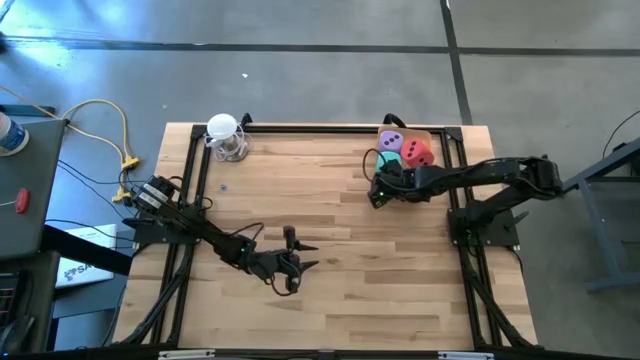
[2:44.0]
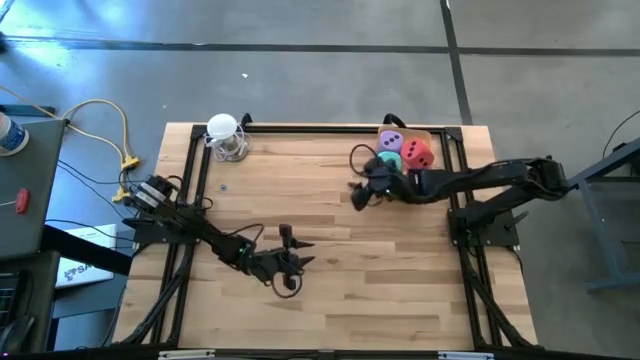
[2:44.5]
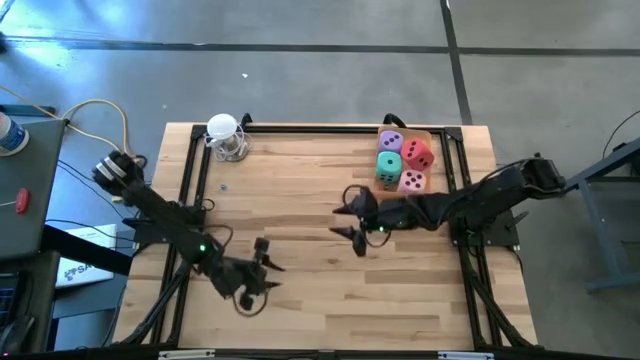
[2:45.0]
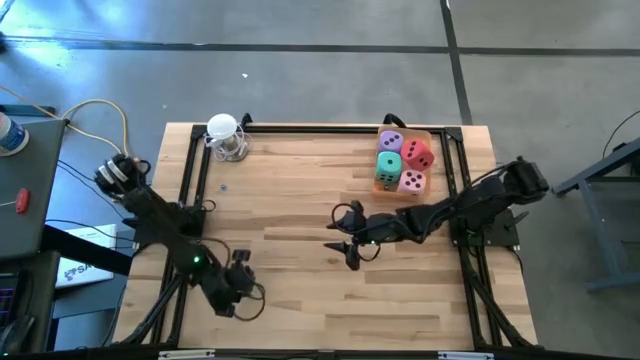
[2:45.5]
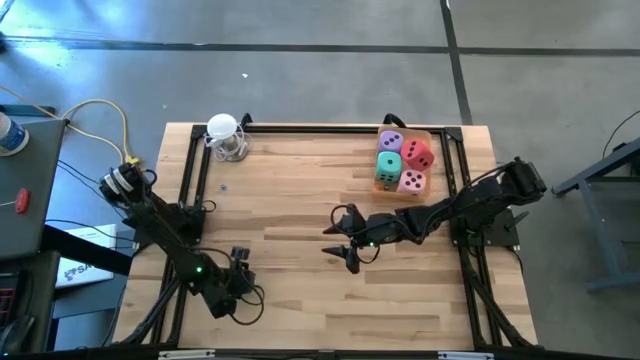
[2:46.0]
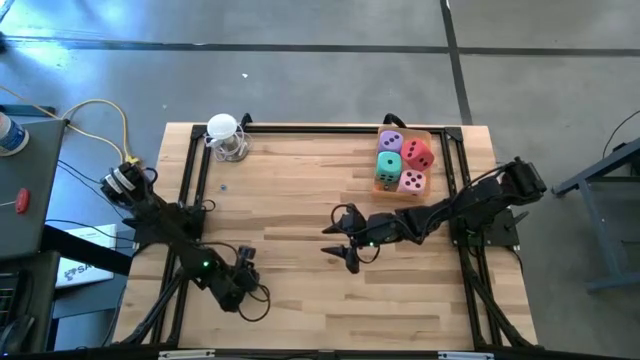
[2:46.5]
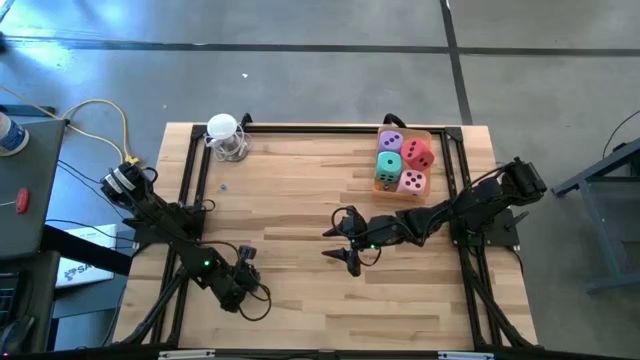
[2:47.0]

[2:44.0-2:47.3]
Task: Pick & Place Dice
Put the green small die into the orange bin

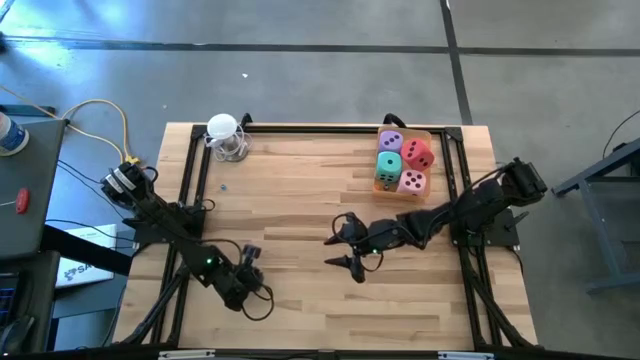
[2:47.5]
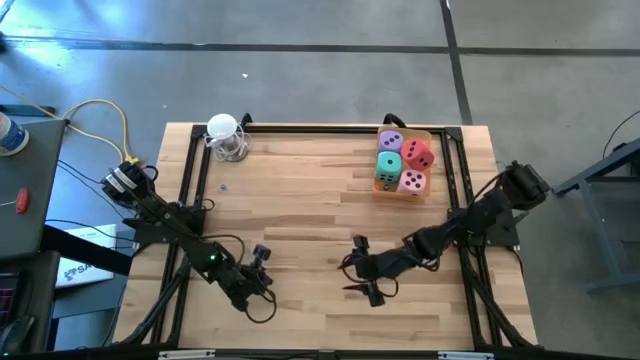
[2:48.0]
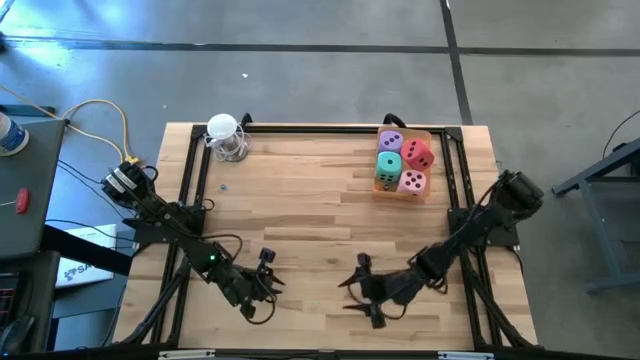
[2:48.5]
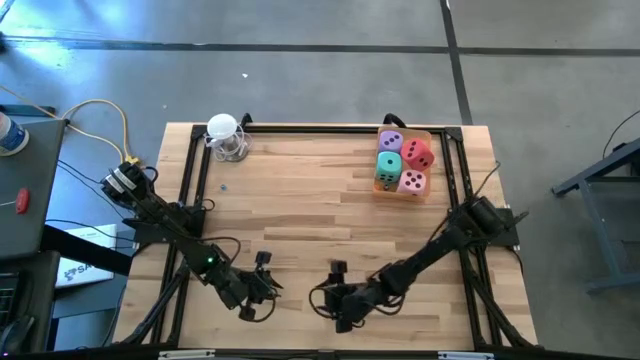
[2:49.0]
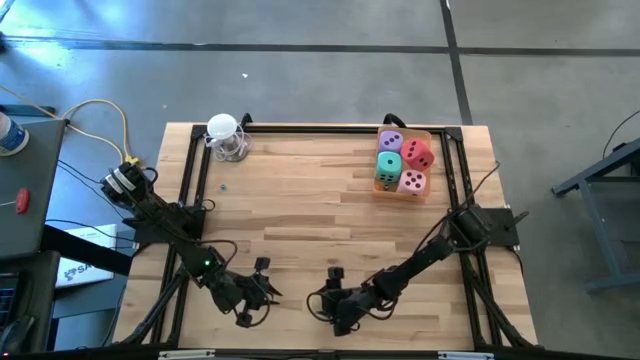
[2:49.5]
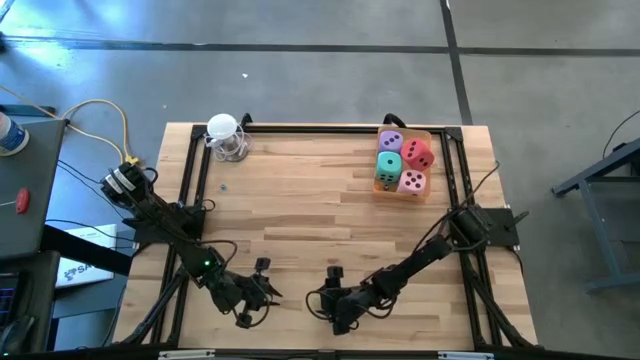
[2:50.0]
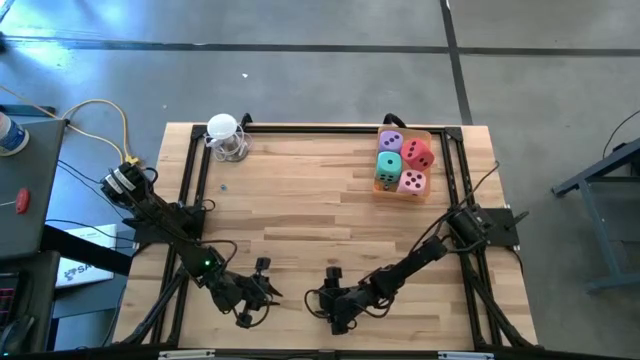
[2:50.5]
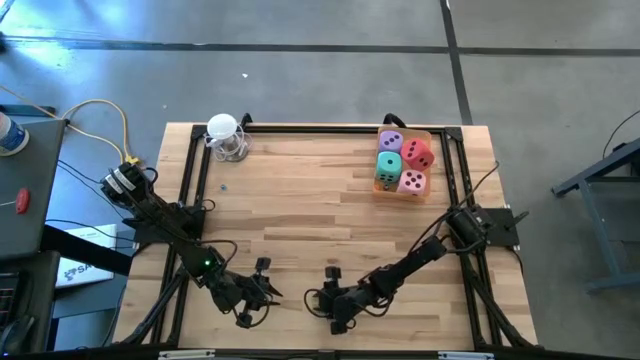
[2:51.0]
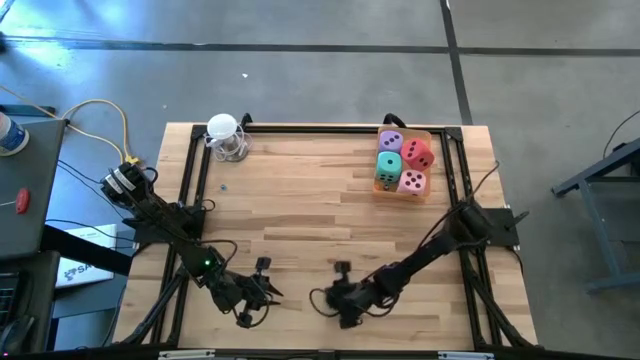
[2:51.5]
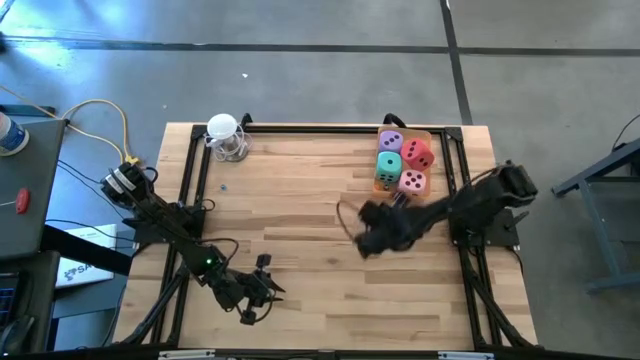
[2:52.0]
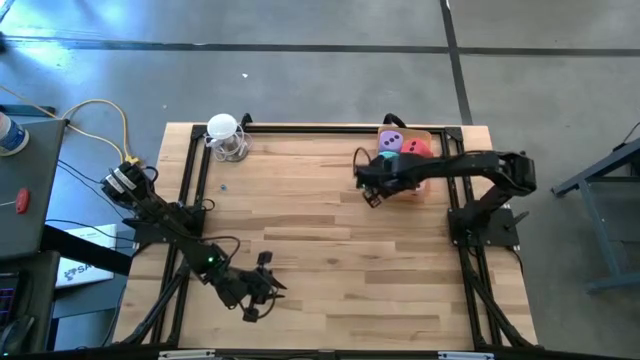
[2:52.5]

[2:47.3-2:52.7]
Put the green small die into the orange bin

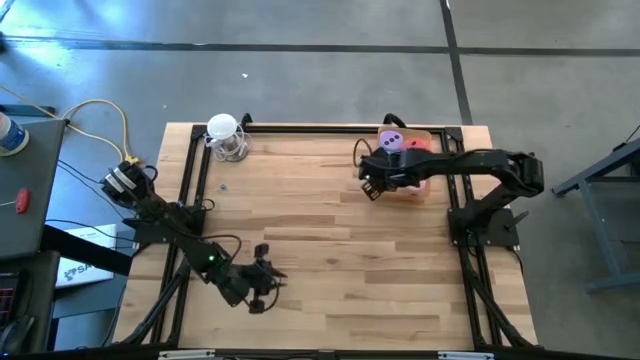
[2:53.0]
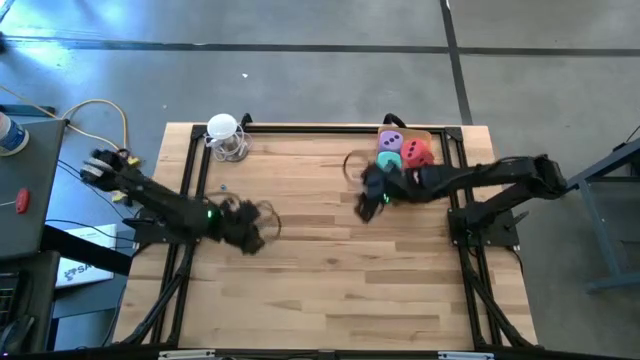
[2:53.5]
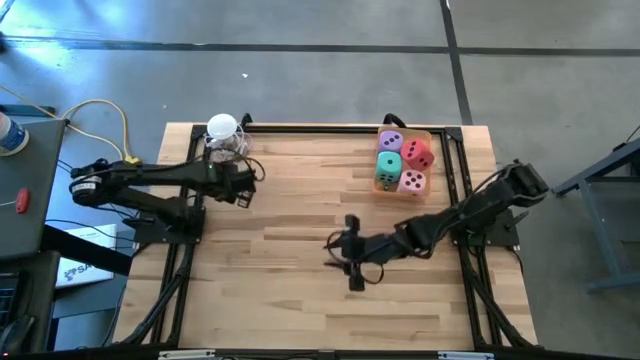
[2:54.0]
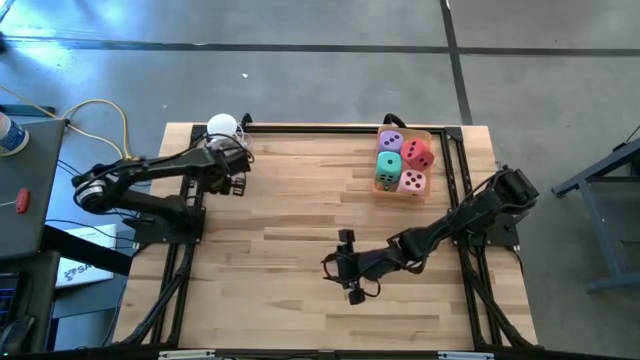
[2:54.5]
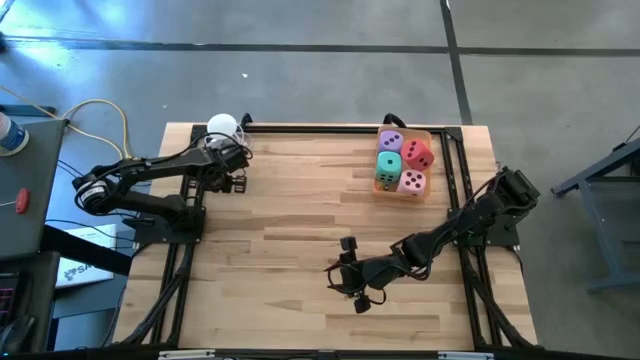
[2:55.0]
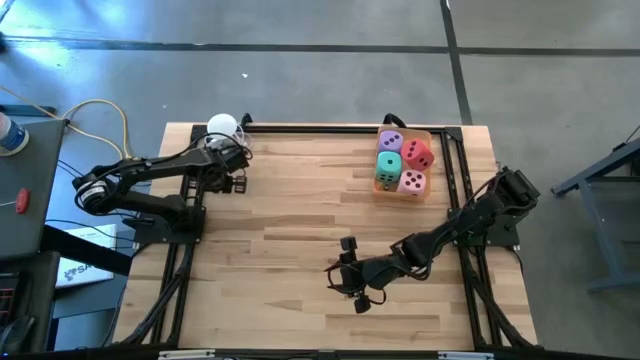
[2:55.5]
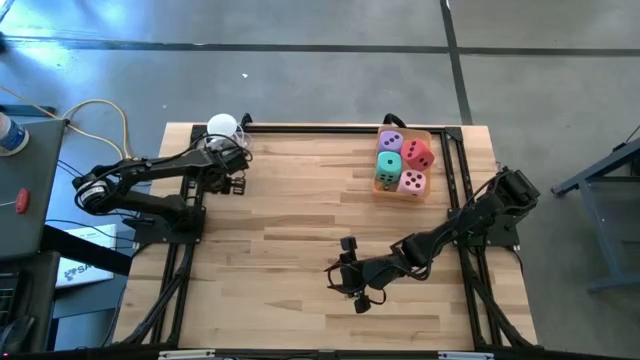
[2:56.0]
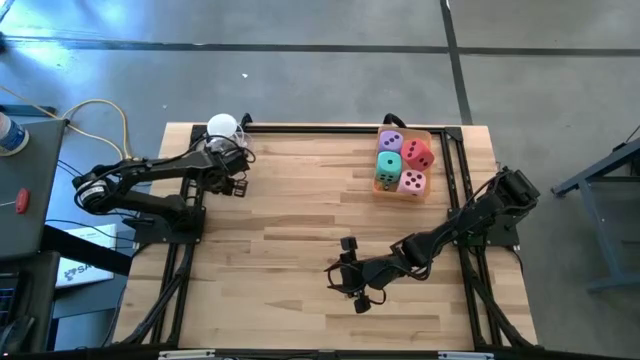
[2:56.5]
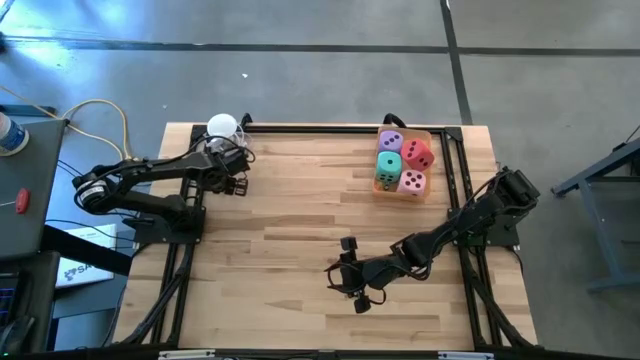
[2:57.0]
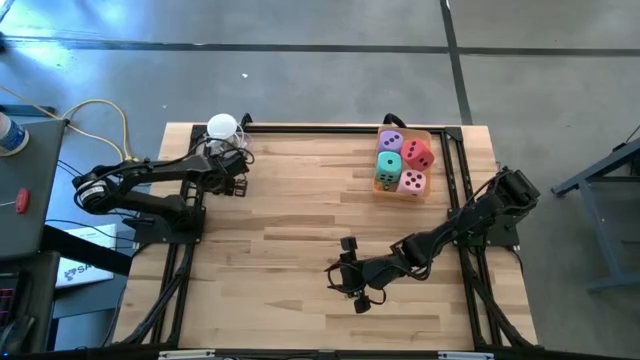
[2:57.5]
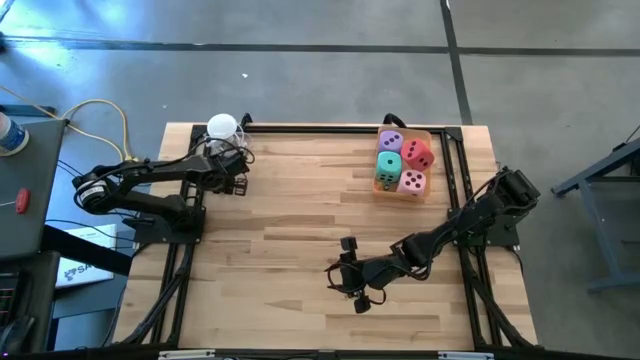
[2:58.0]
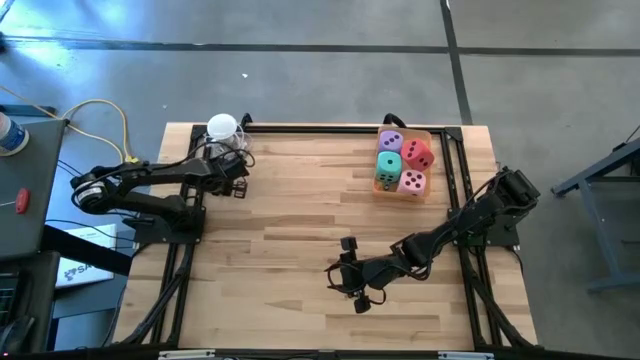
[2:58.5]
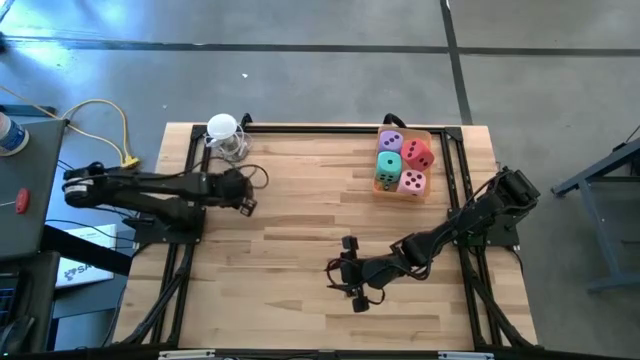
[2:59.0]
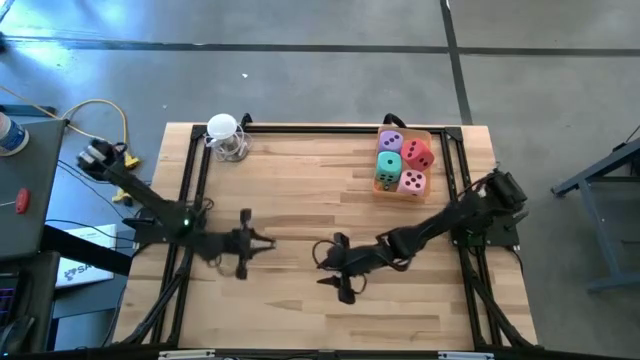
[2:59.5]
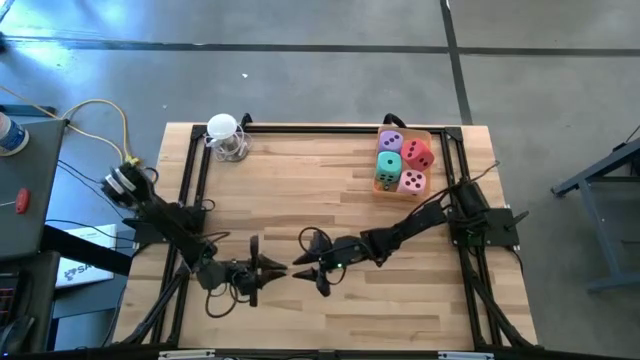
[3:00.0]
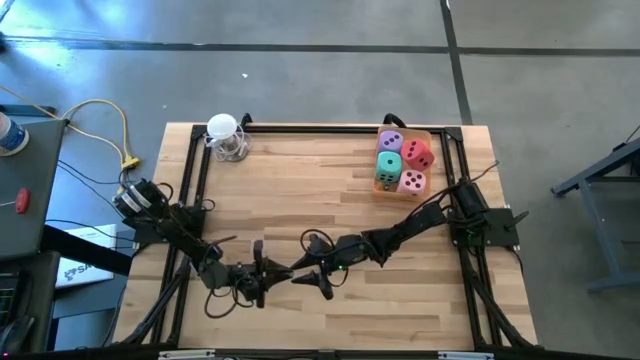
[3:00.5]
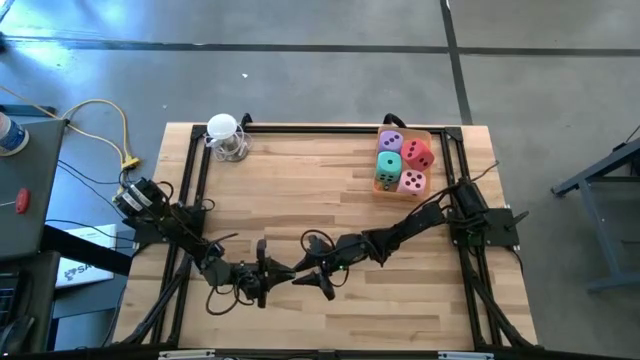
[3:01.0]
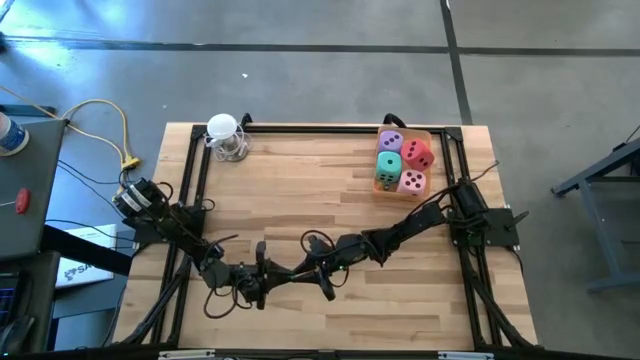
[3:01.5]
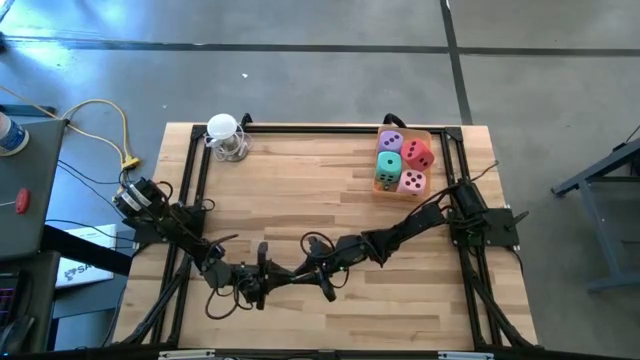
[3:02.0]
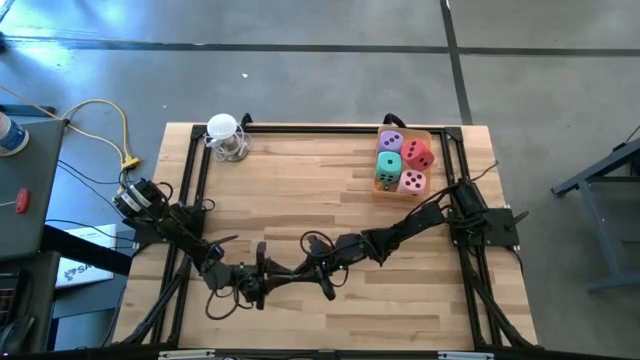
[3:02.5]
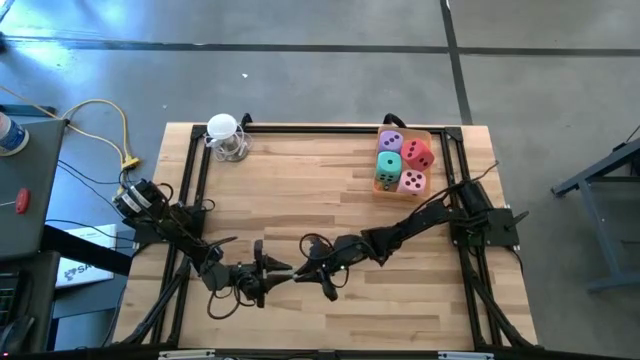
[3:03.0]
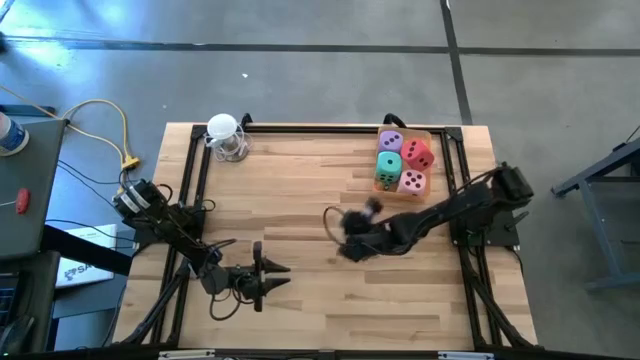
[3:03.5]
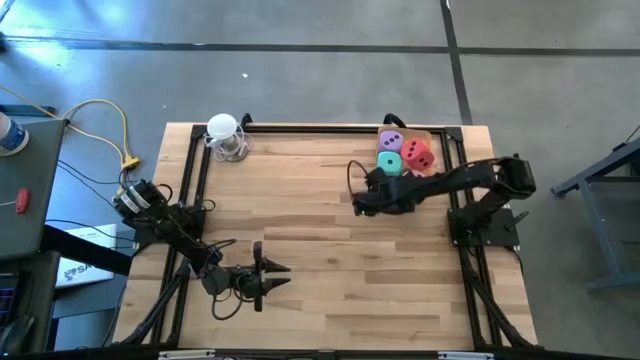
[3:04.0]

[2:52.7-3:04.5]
Put the light blue small die into the orange bin
